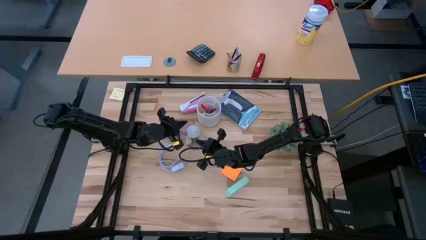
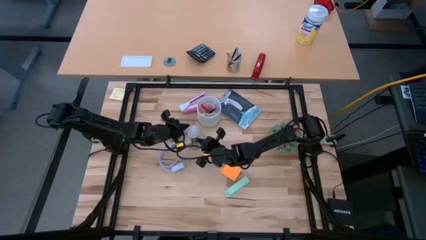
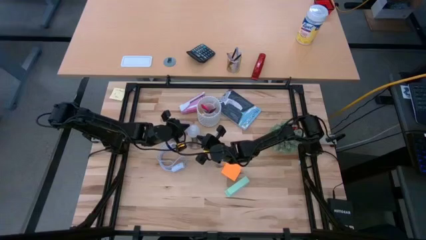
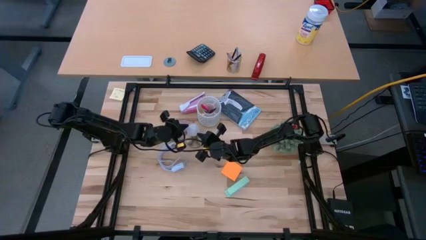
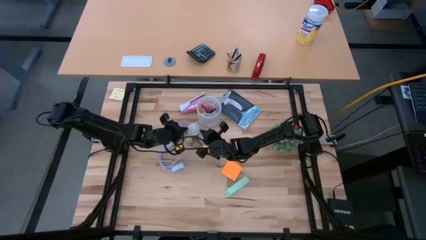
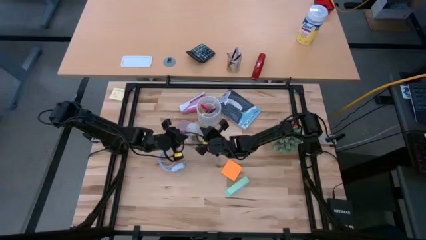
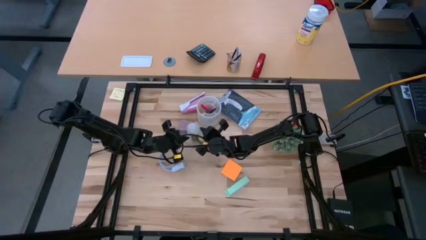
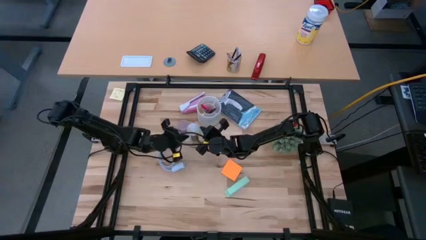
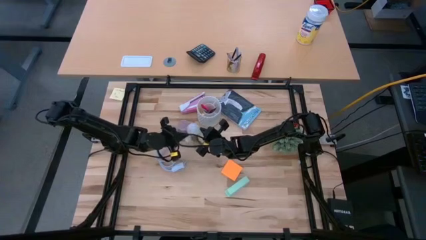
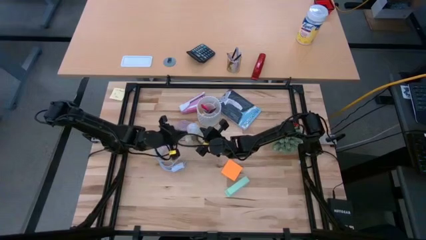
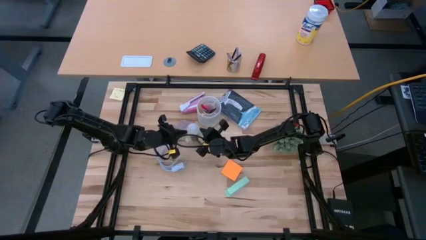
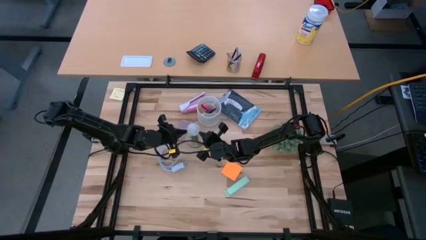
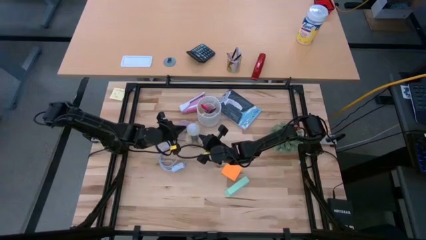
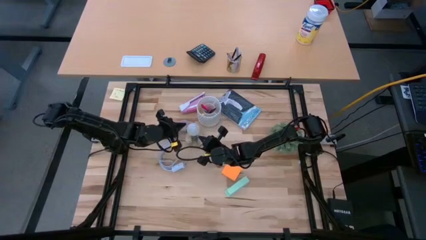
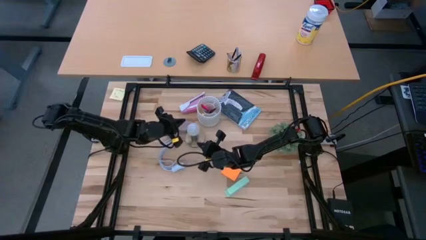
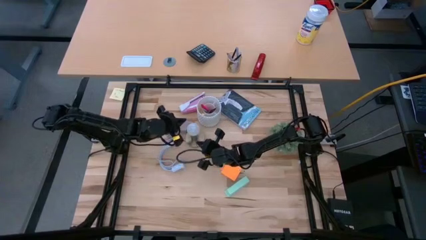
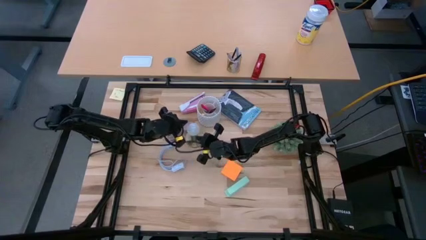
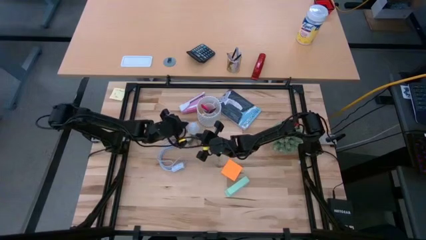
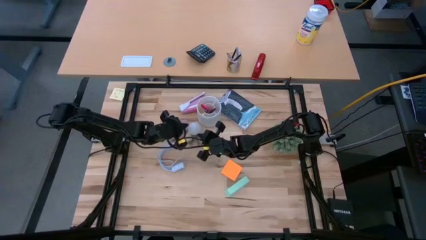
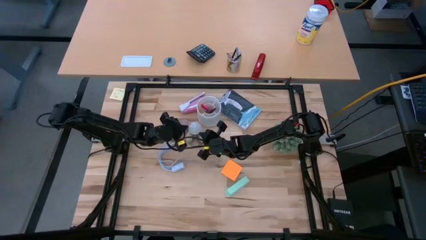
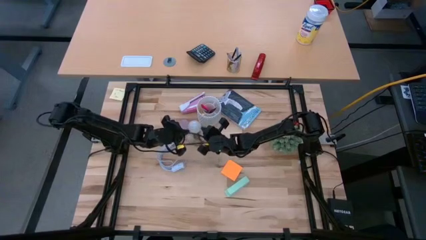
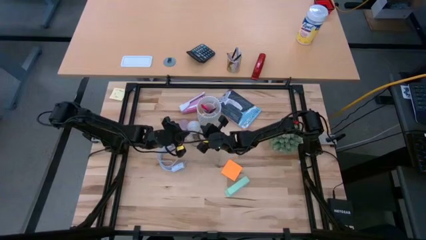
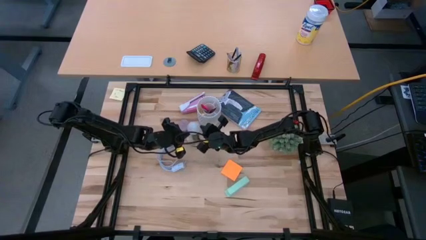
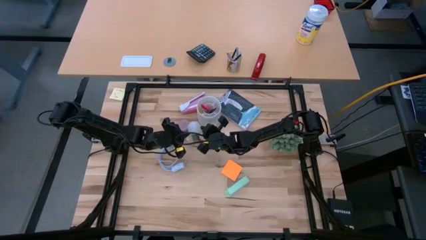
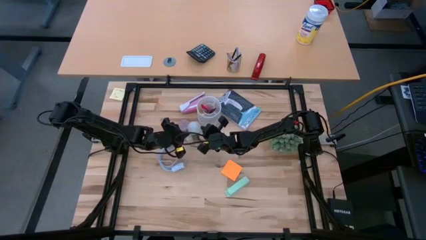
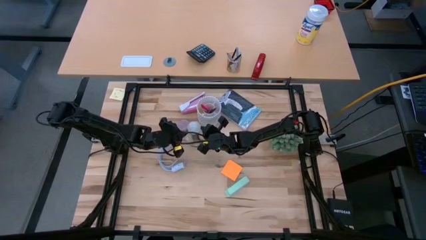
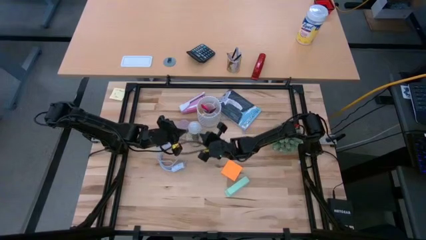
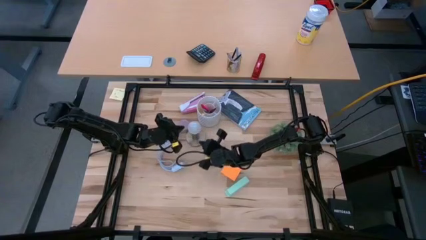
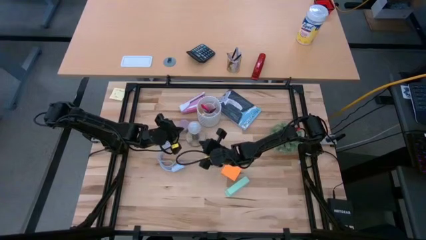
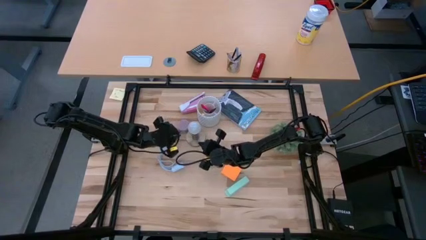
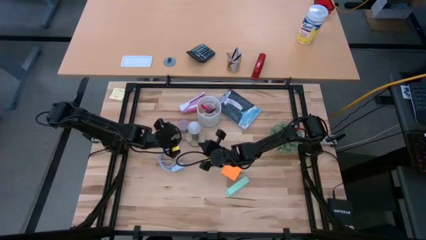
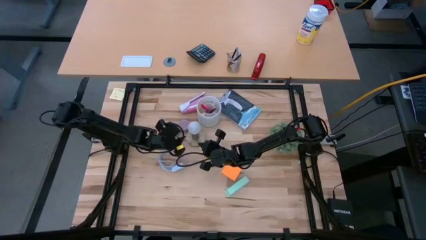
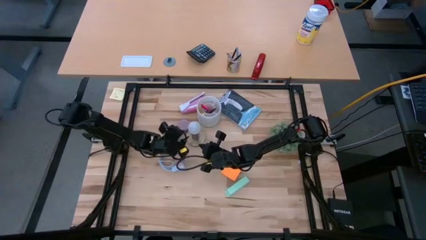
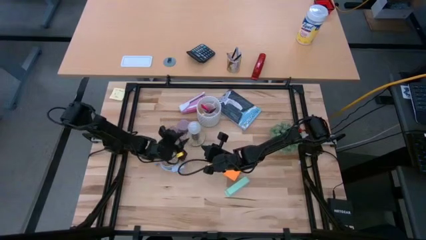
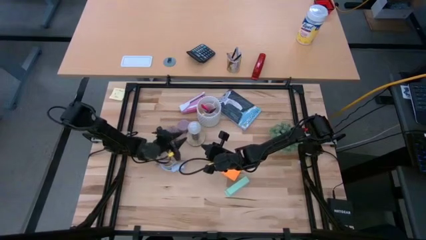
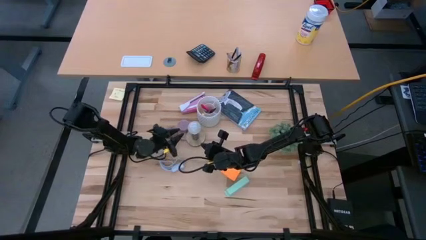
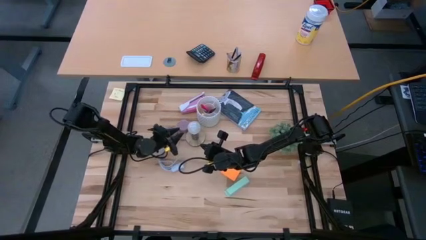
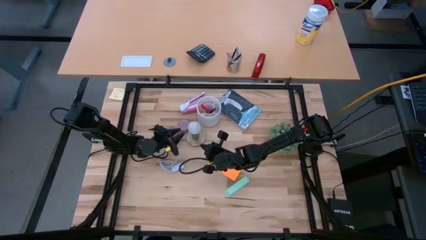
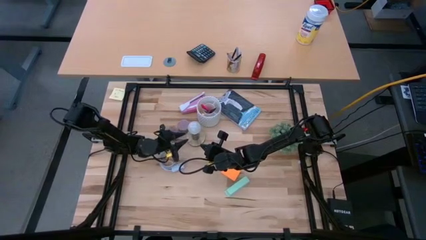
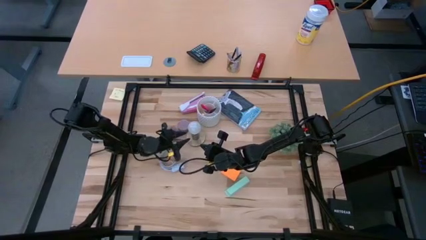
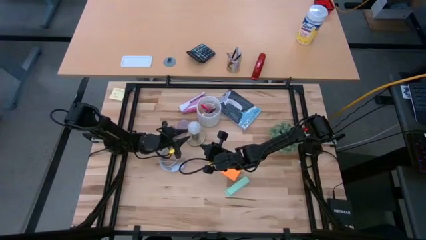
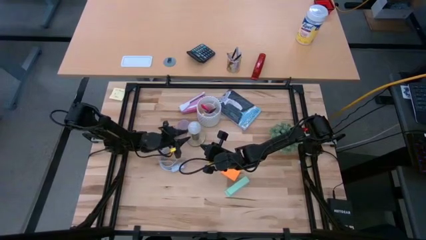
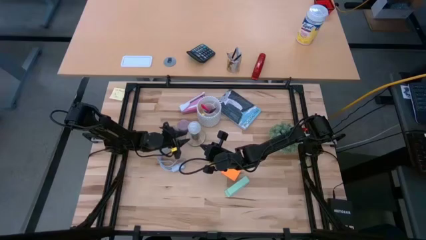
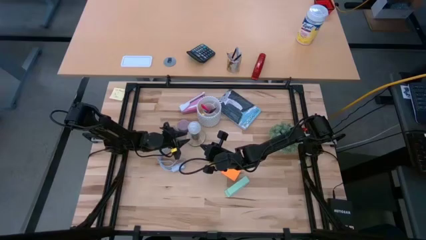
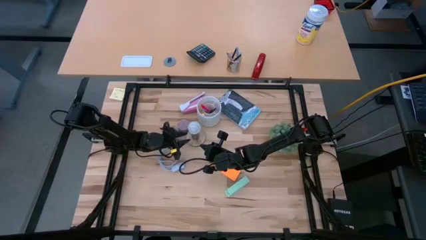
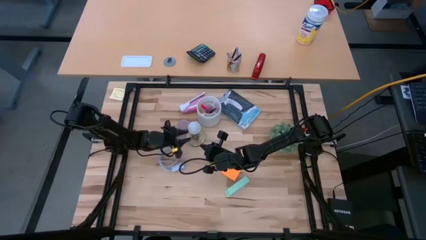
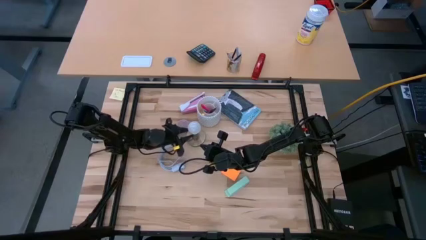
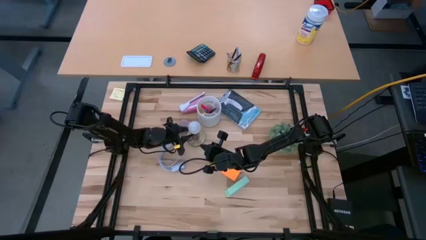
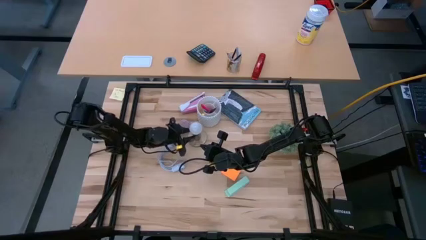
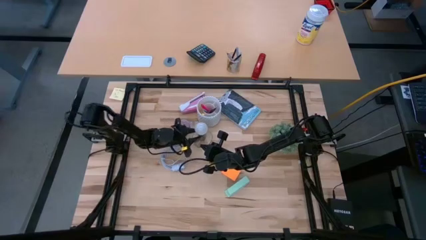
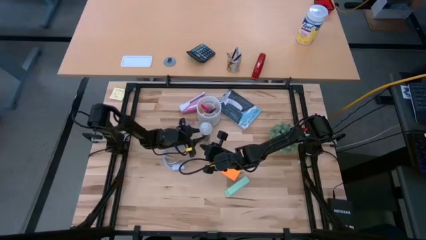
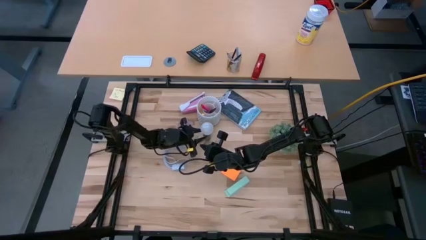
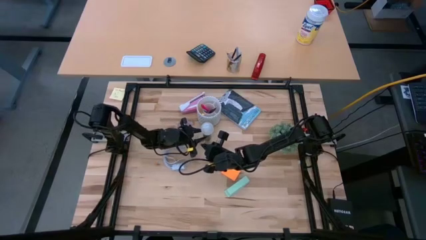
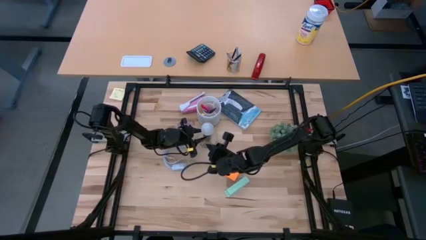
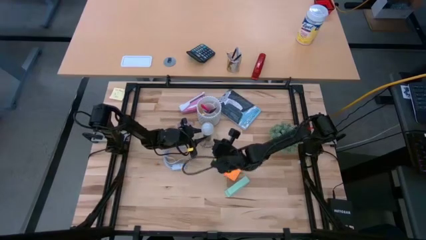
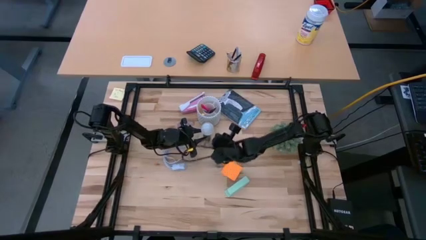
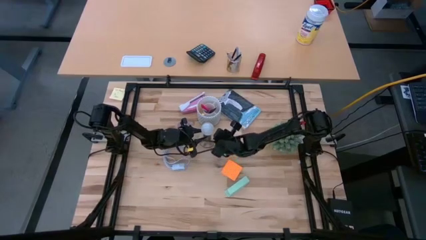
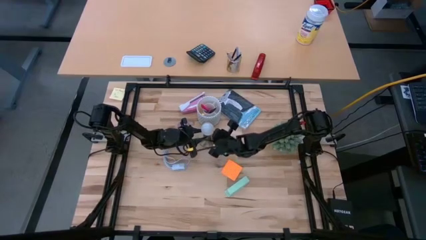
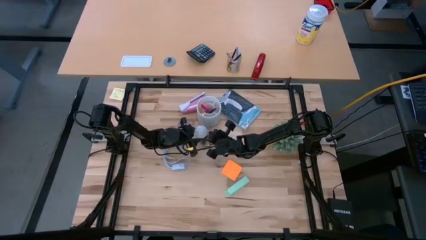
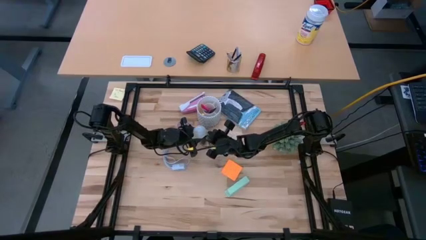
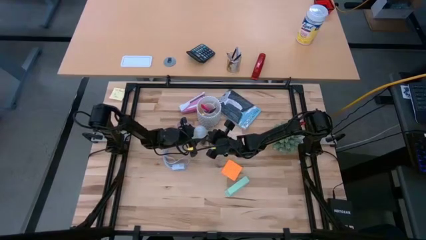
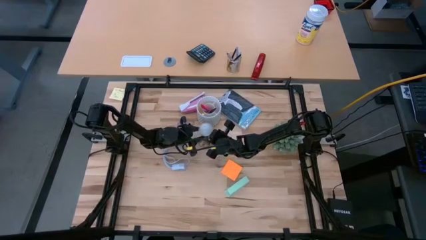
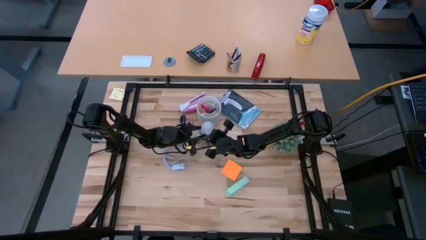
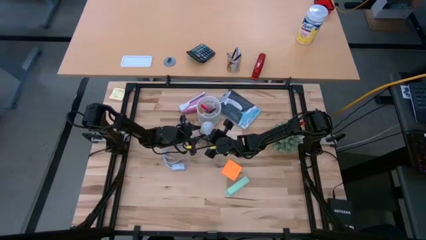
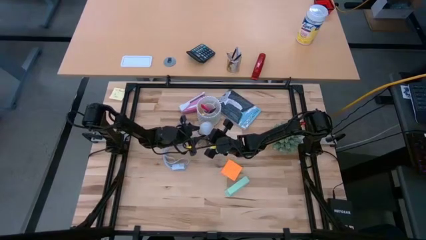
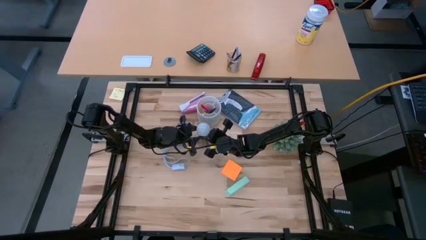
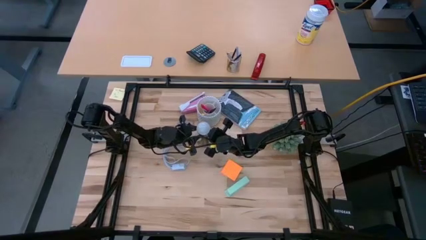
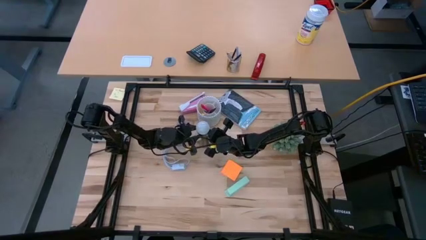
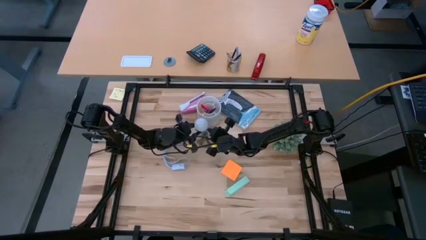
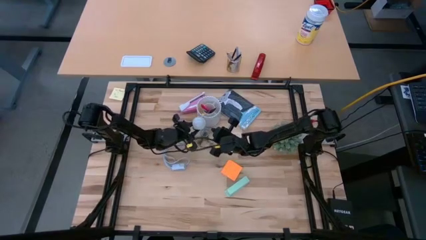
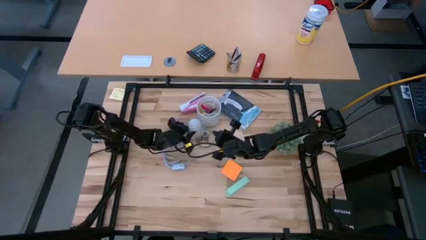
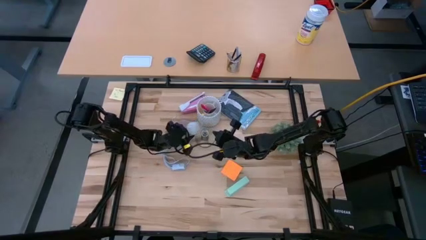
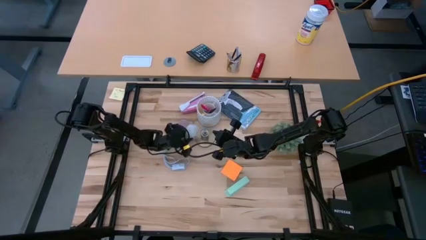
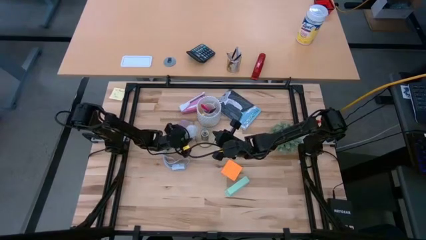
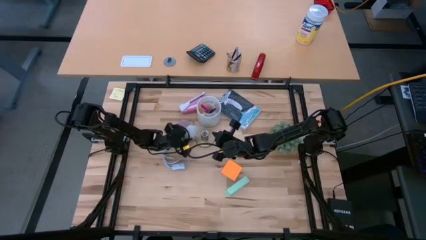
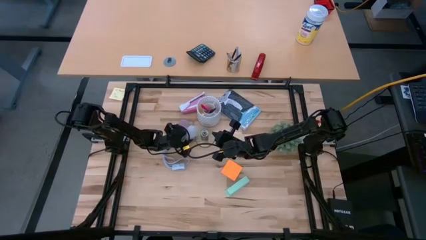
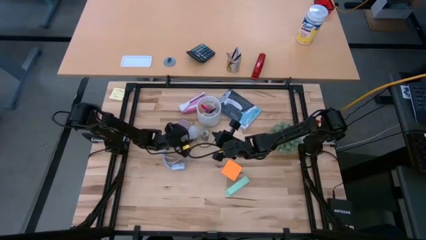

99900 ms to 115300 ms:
Task: Screw lightbulb
Remove the lightbulb from the lamp

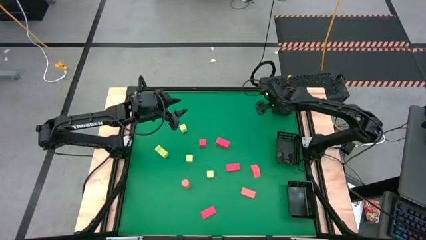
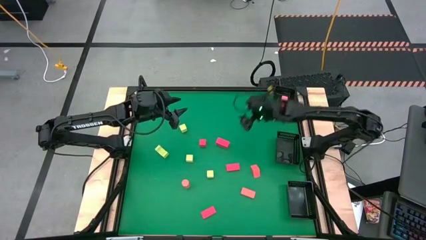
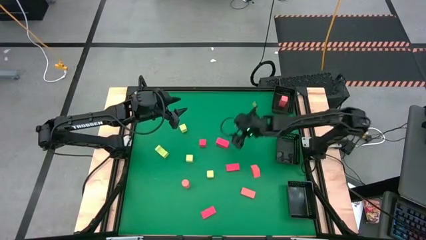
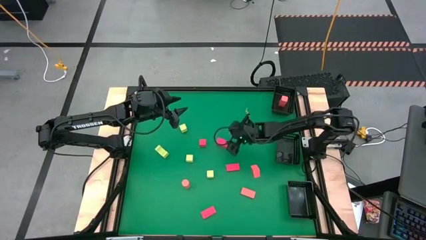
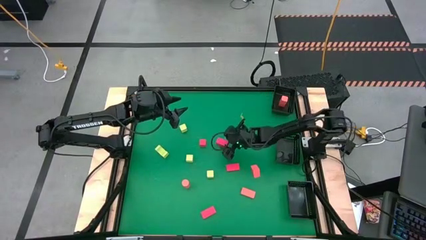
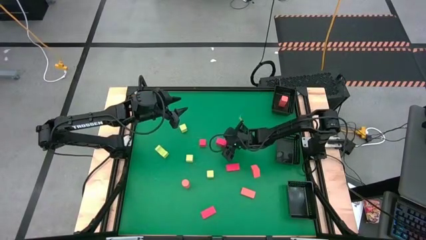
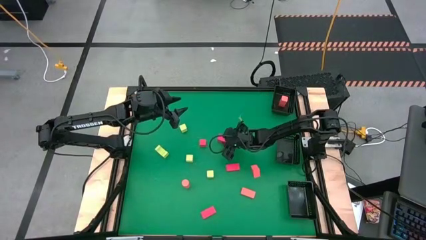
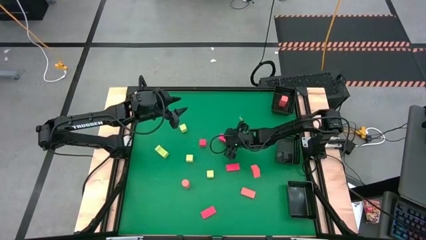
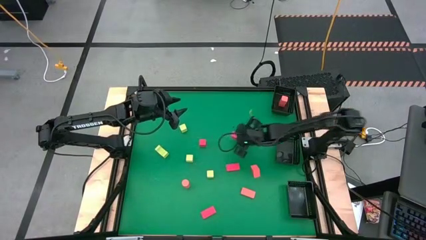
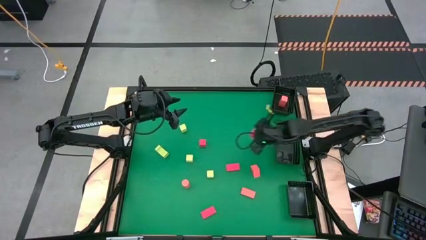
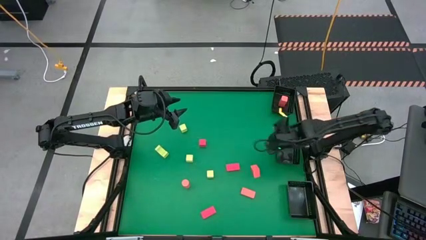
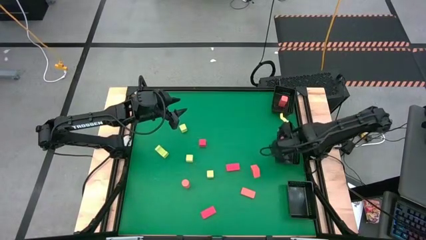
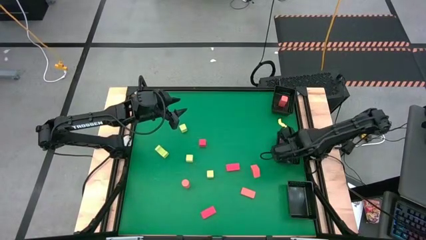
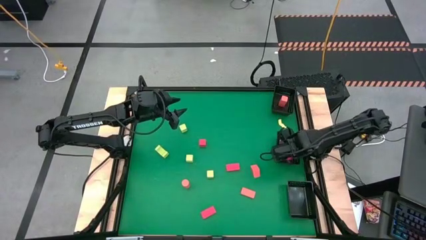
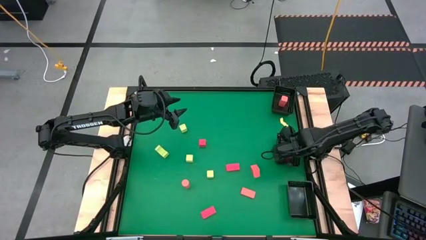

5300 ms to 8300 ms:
Task: Sort & place blocks by color
Put the top right red block into the middle right black bin
